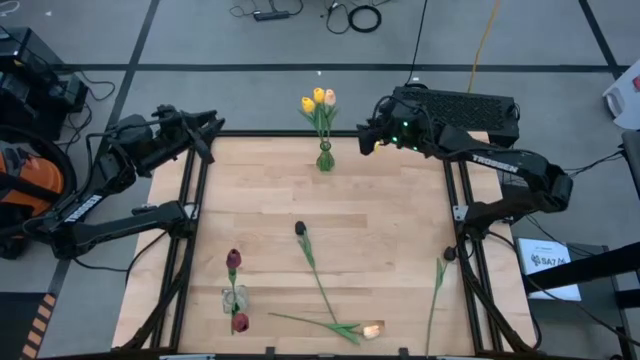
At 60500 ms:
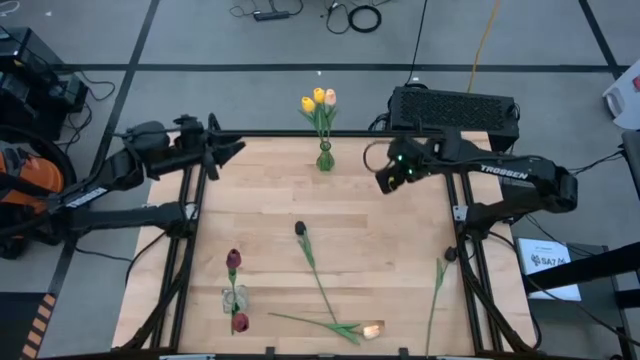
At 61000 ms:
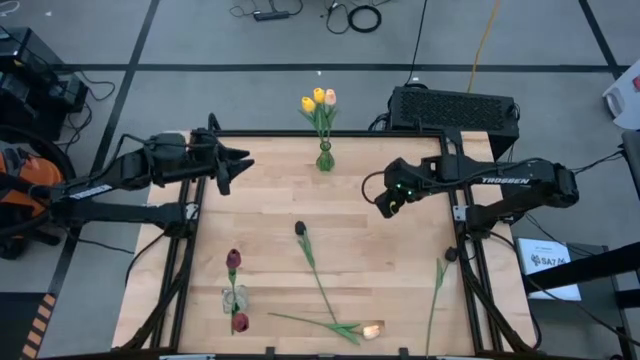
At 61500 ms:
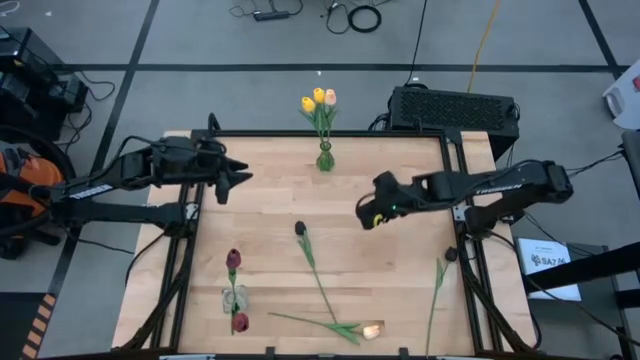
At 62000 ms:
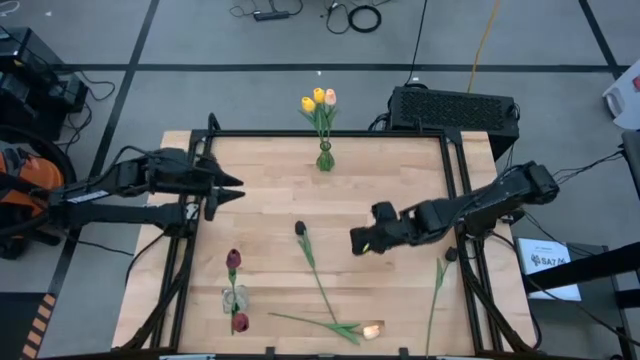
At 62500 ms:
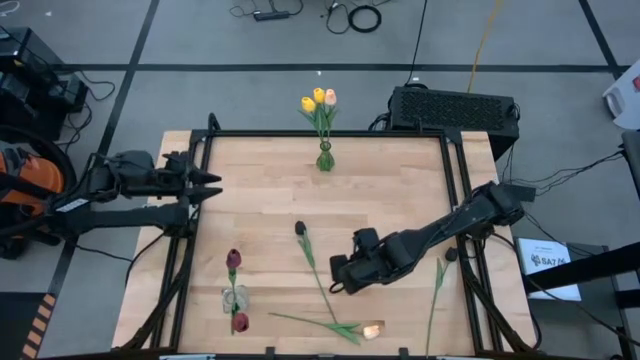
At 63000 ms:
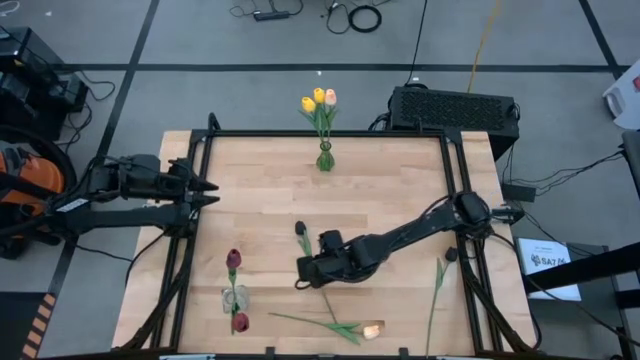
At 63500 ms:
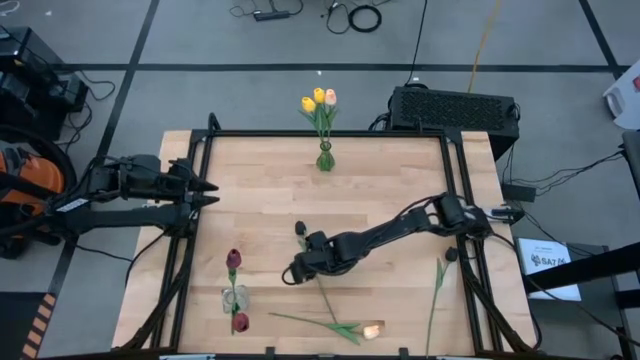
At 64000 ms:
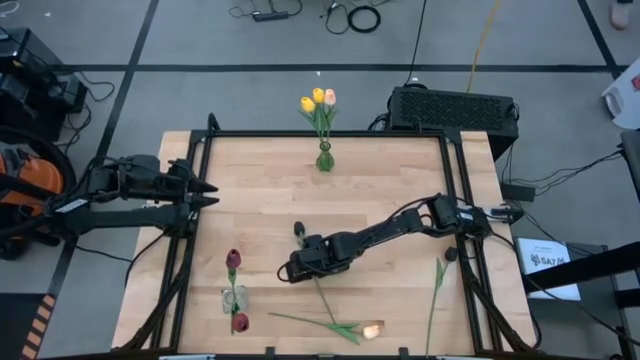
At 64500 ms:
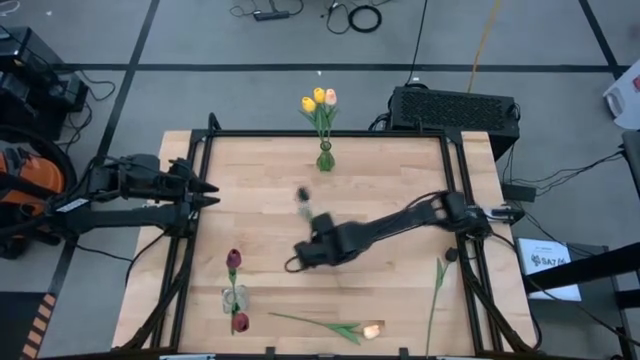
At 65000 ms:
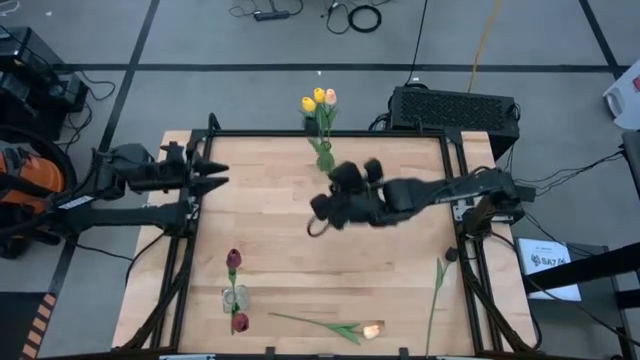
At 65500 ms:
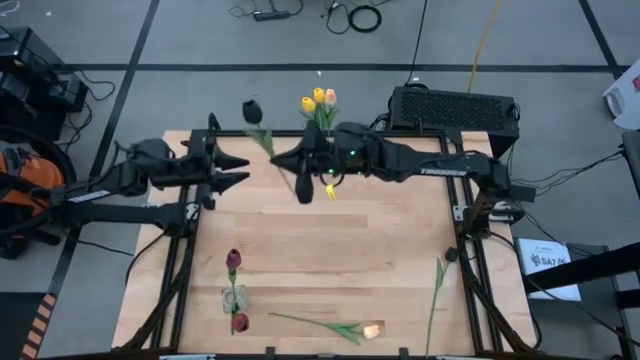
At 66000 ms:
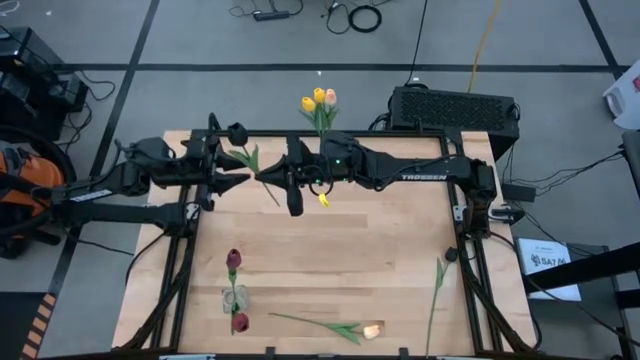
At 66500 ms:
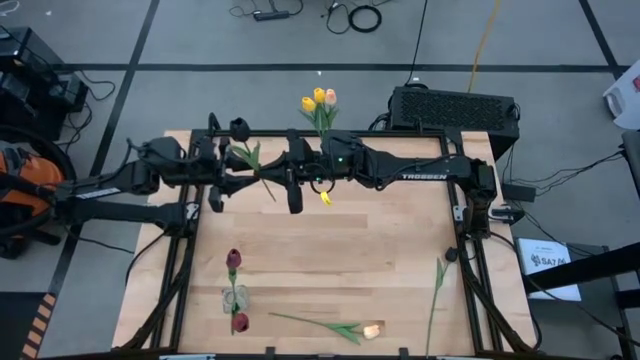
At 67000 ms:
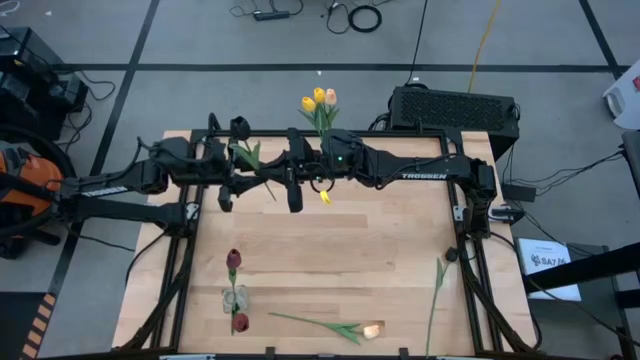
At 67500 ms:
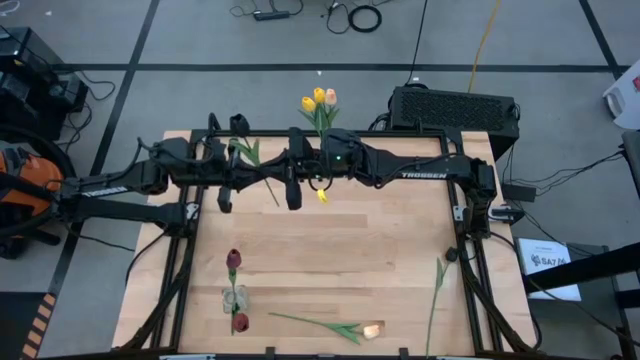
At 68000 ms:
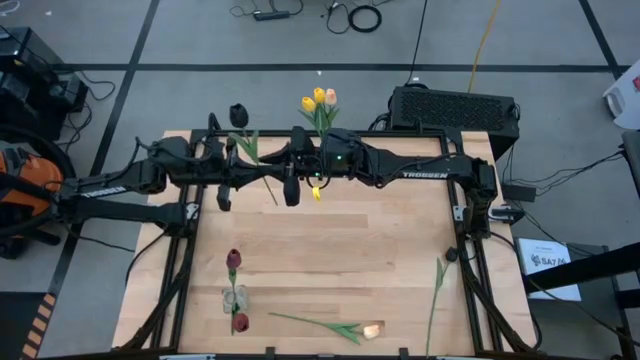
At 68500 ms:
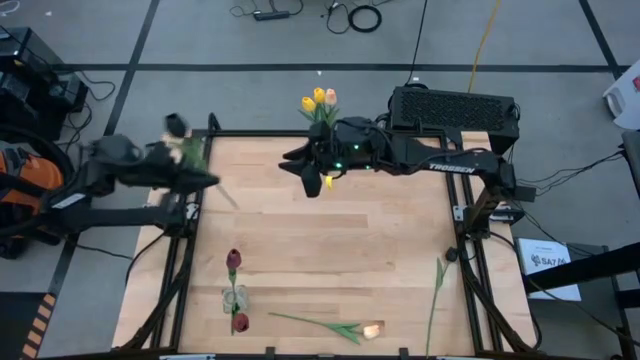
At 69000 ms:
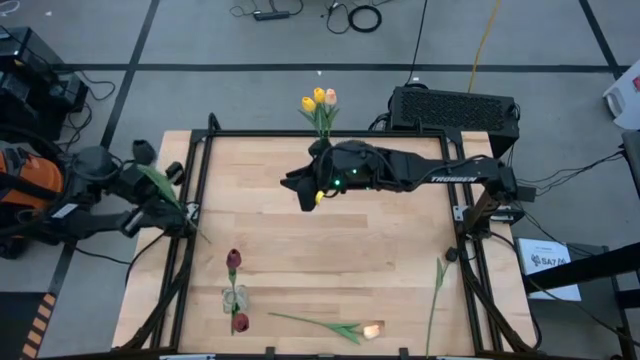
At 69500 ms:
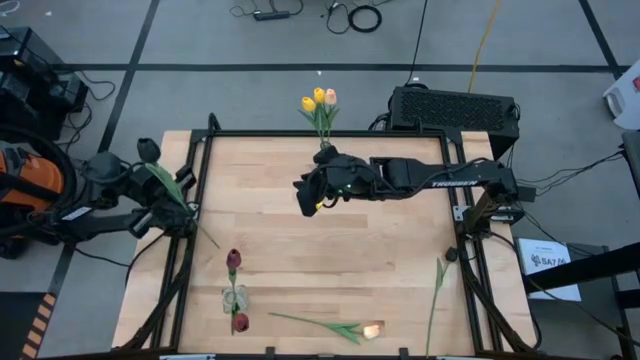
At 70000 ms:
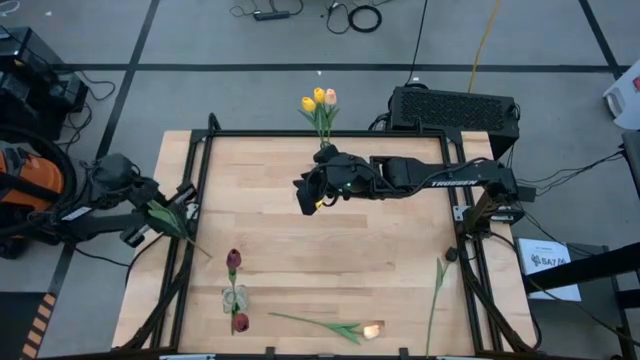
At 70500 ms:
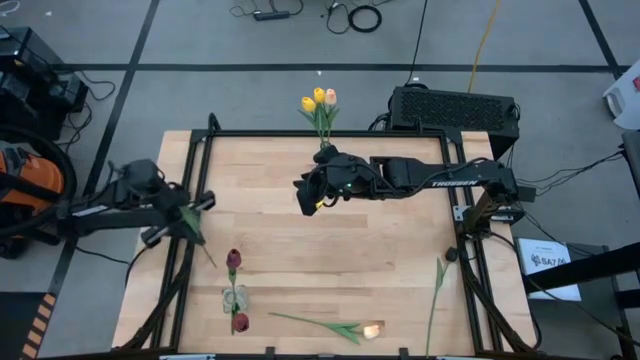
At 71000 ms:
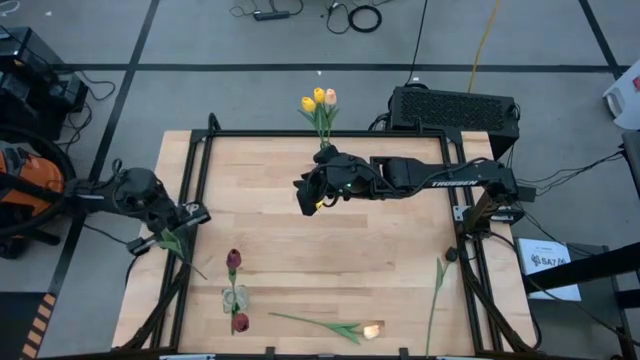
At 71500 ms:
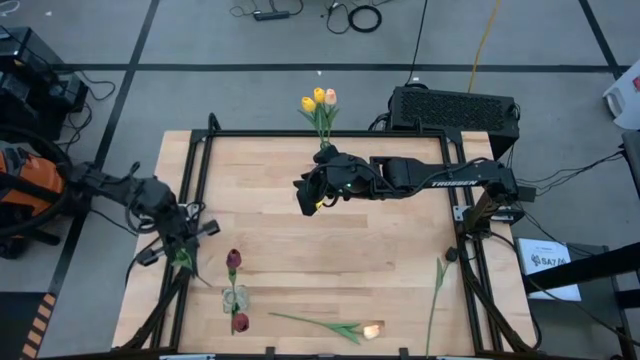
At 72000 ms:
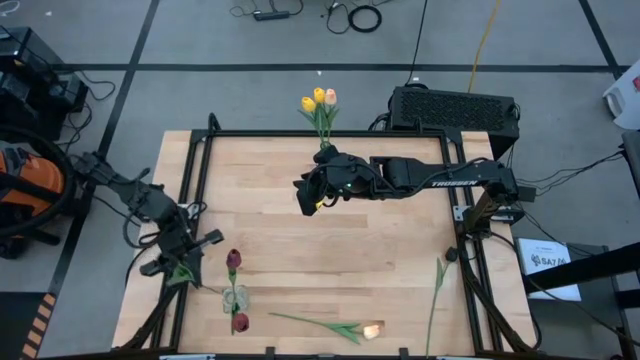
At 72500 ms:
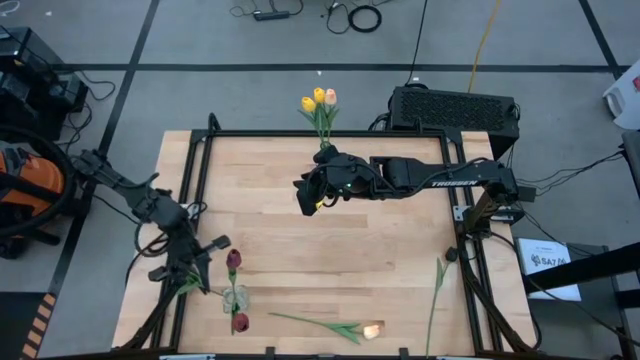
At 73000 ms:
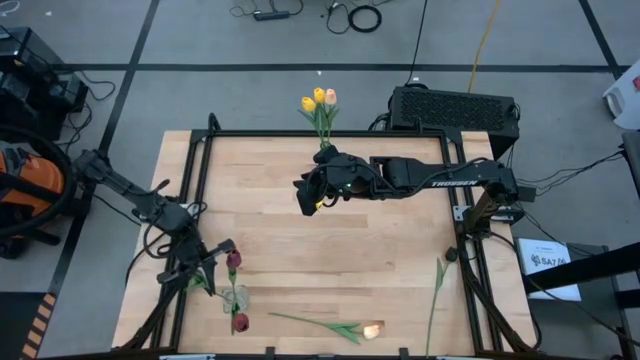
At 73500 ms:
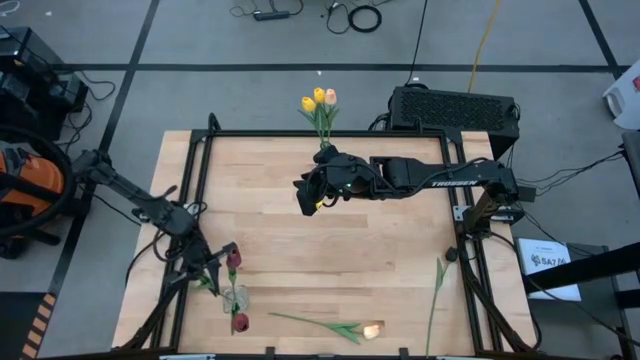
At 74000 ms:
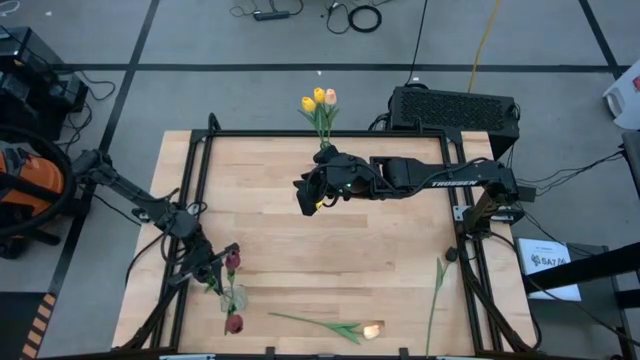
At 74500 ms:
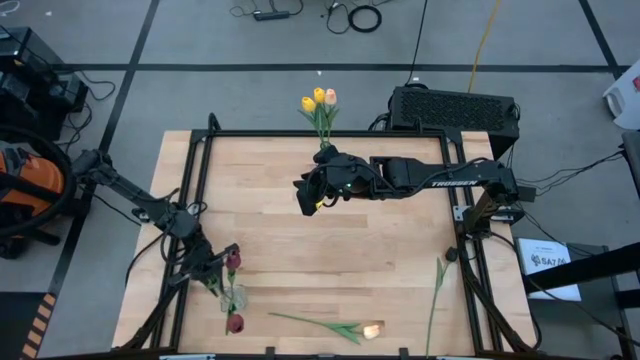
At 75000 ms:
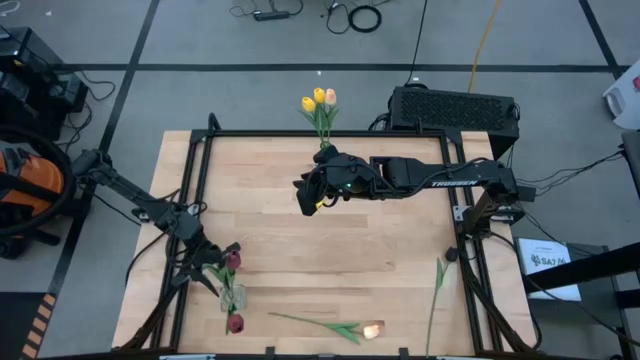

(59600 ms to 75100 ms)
Task: Sort flowers into vase by color
Put the left black flower into the transparent vase

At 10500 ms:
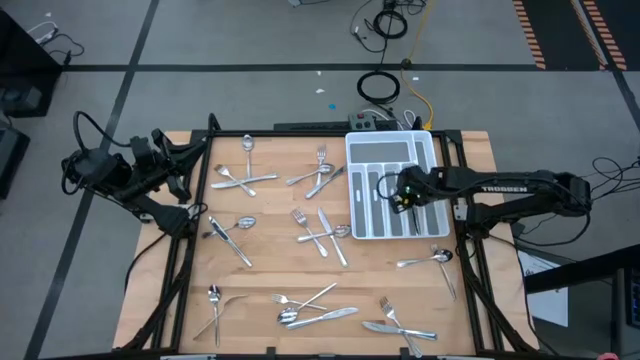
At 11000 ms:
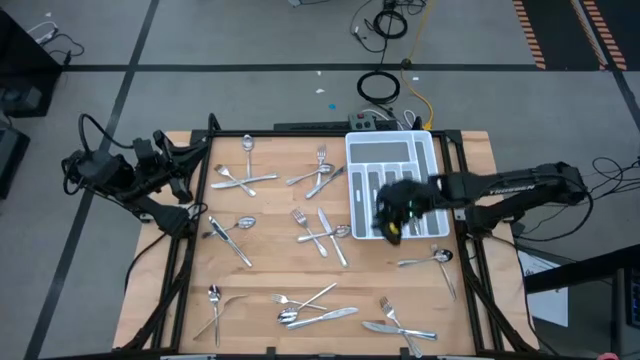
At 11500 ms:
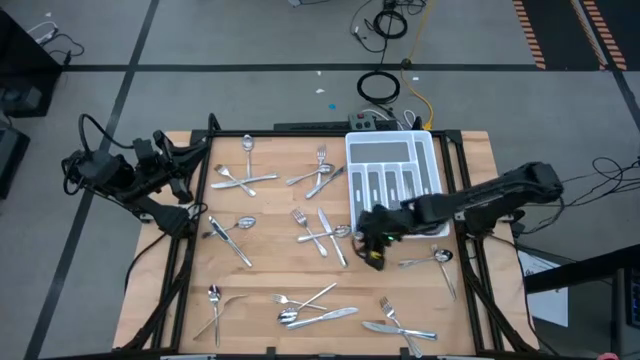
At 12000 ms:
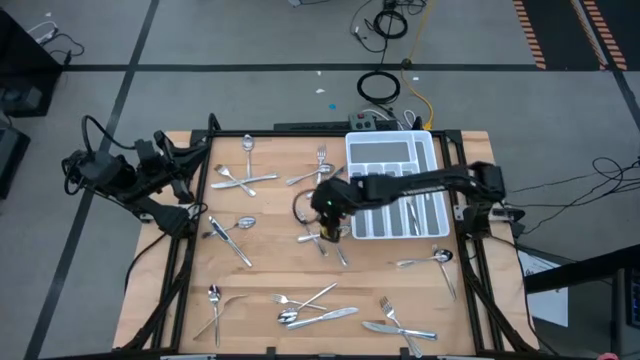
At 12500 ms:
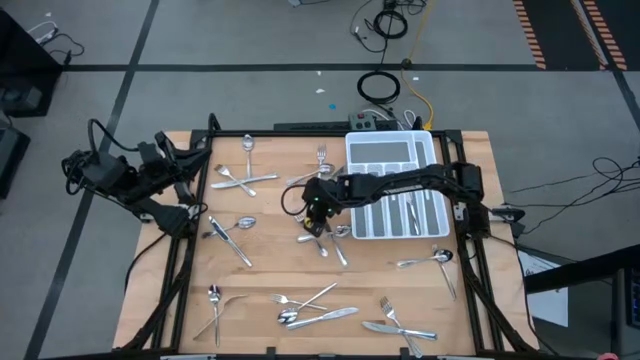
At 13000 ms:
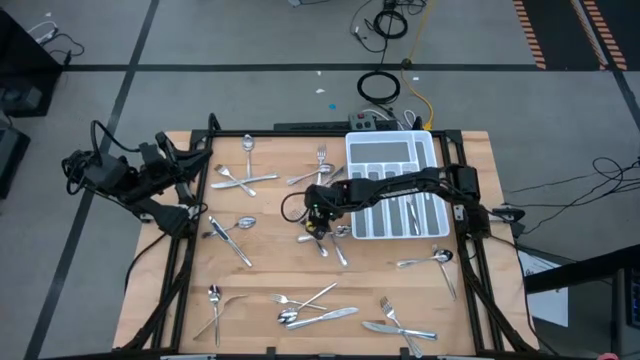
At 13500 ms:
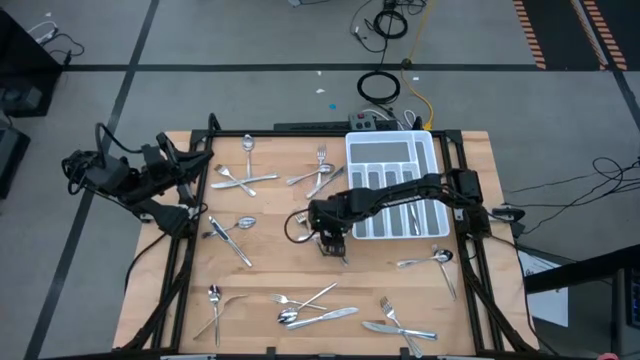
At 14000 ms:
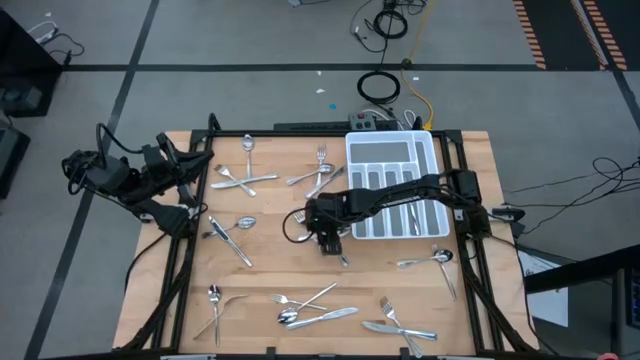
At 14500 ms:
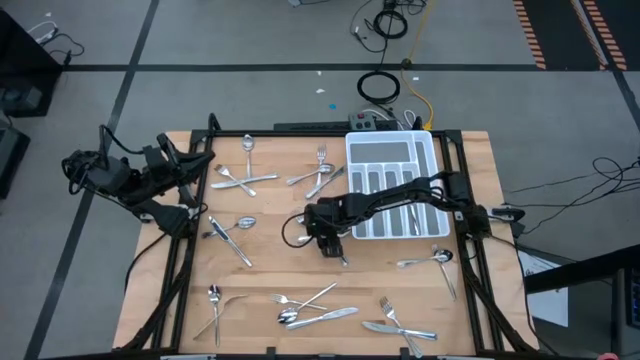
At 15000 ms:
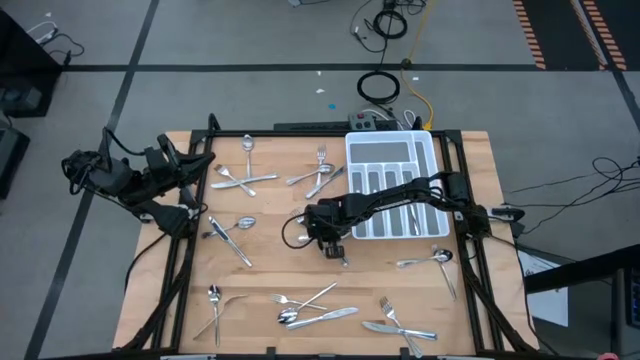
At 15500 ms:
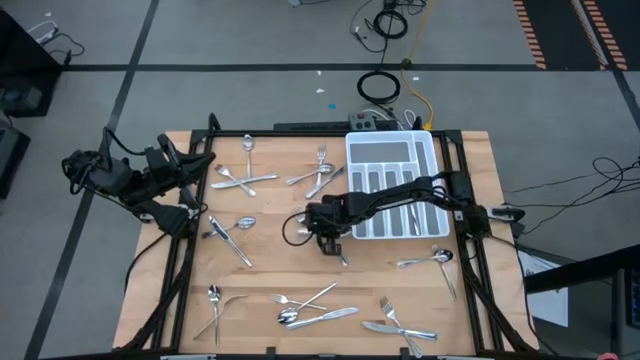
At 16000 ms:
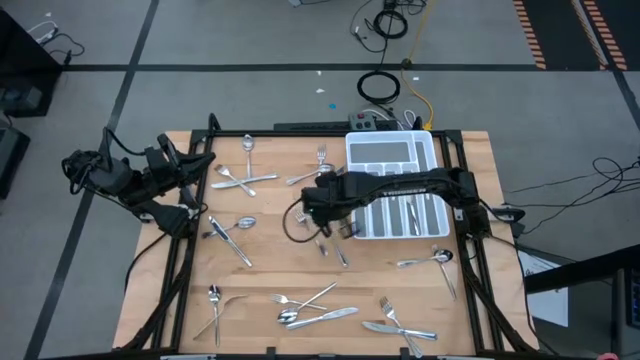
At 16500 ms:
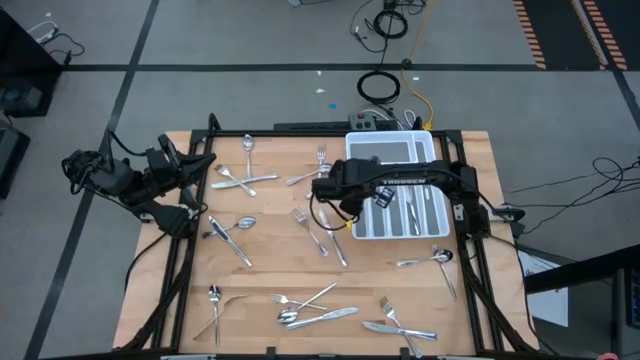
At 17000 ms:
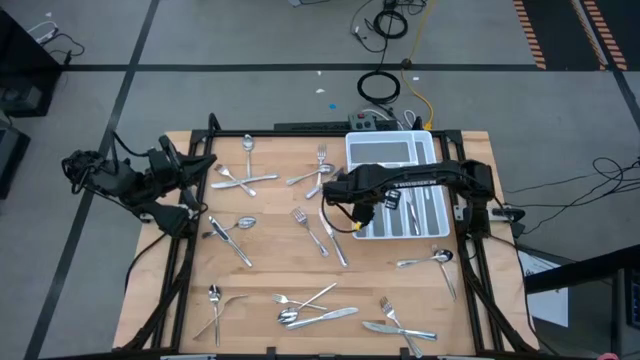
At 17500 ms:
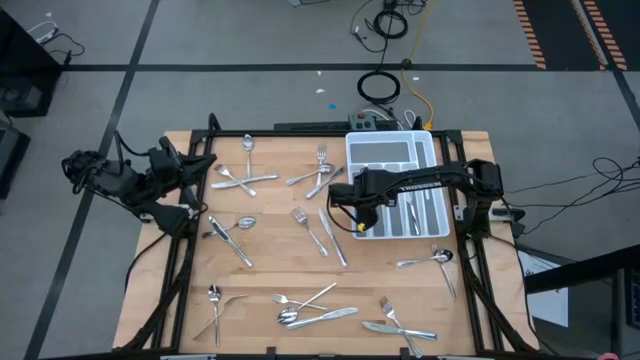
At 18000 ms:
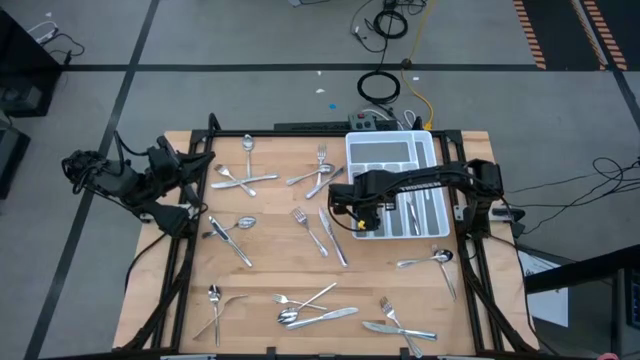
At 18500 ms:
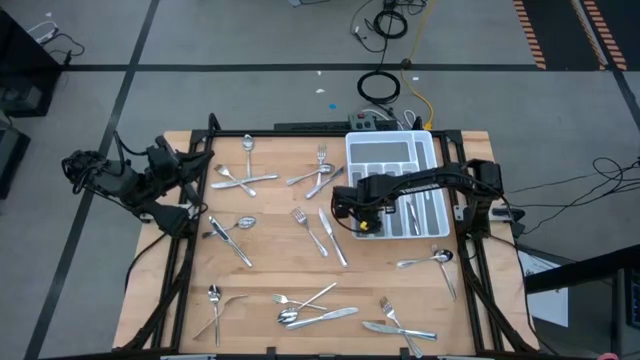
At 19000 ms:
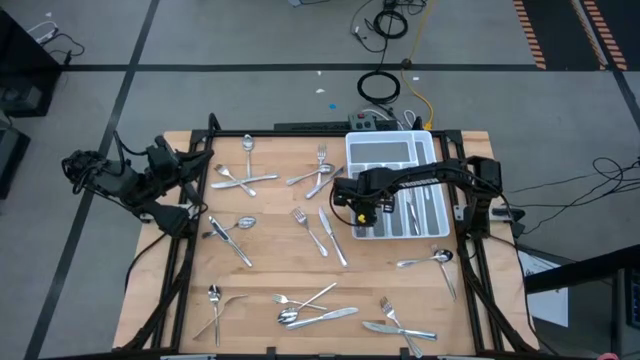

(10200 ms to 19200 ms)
Task: Sort silverware
Put the silver spoon into the white silverware tray
